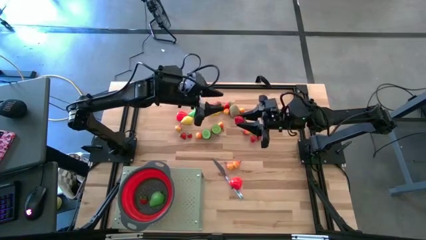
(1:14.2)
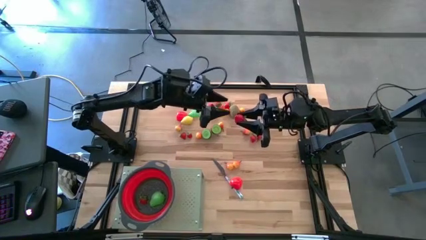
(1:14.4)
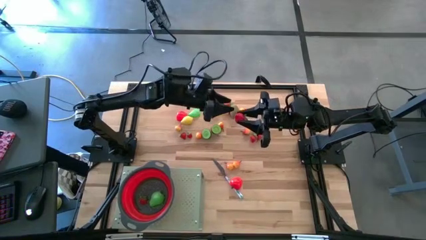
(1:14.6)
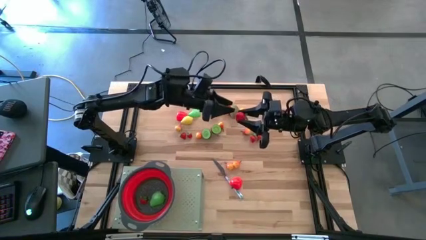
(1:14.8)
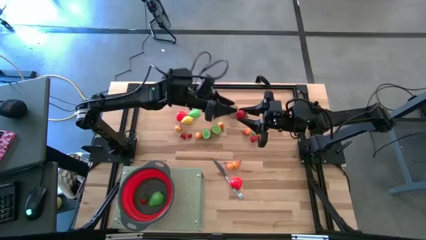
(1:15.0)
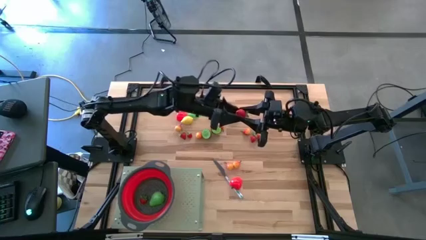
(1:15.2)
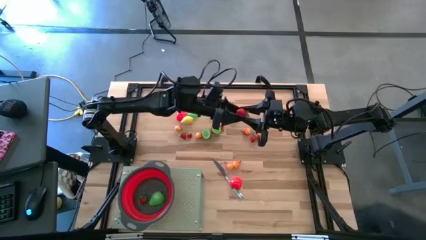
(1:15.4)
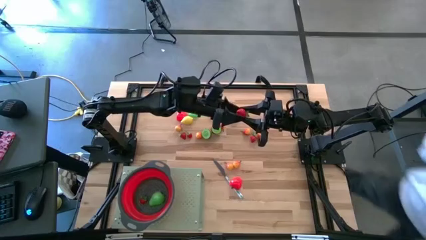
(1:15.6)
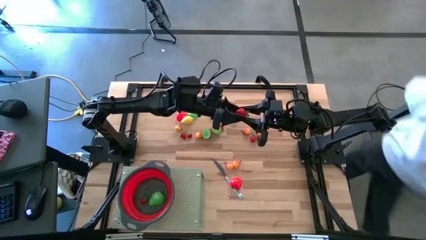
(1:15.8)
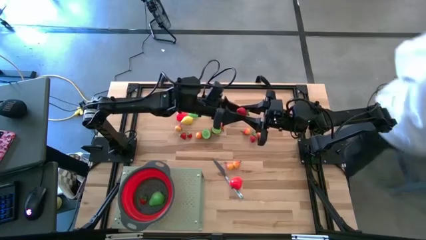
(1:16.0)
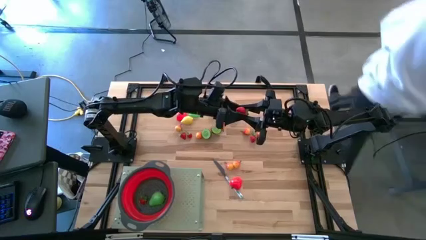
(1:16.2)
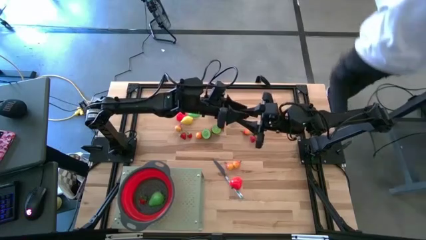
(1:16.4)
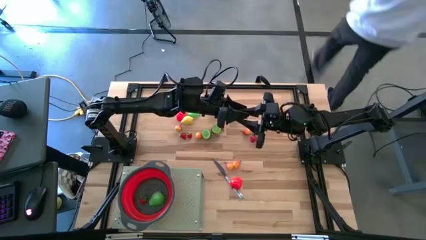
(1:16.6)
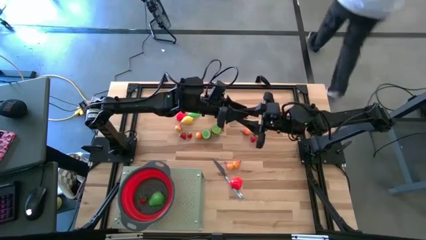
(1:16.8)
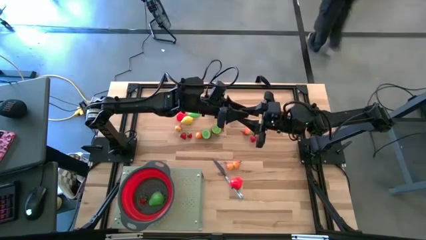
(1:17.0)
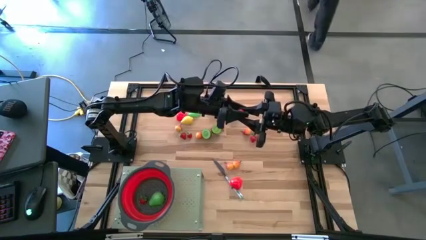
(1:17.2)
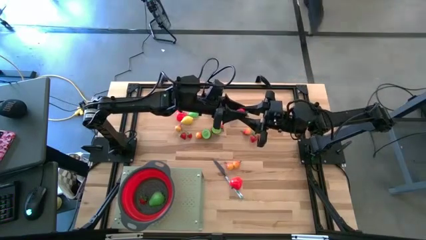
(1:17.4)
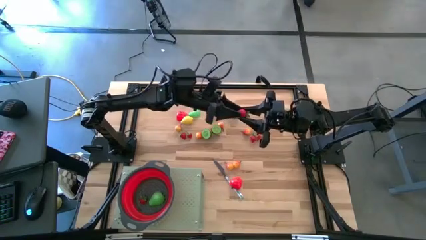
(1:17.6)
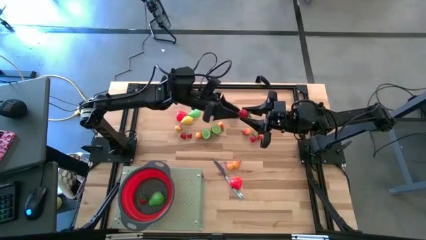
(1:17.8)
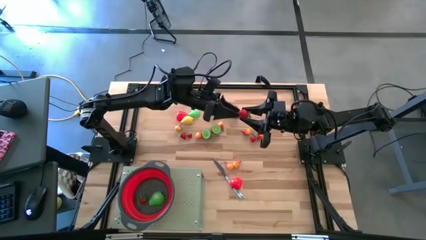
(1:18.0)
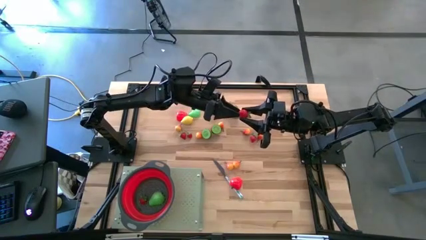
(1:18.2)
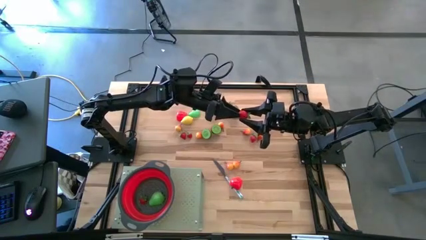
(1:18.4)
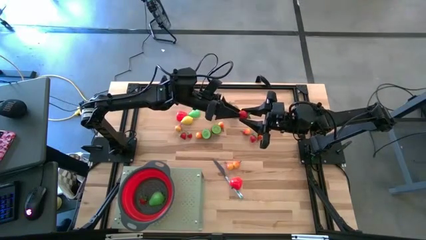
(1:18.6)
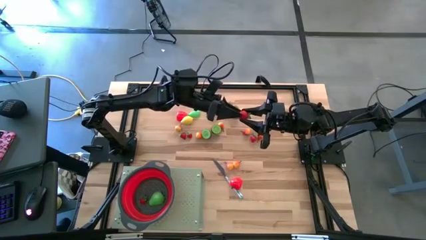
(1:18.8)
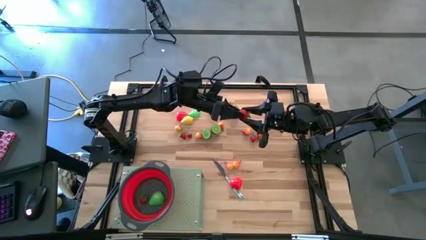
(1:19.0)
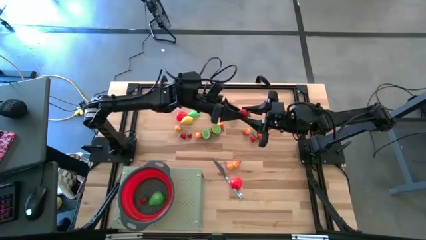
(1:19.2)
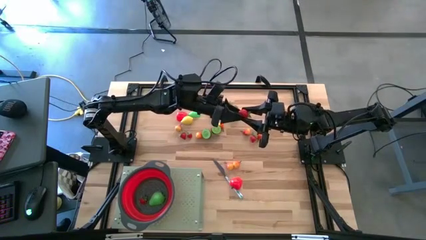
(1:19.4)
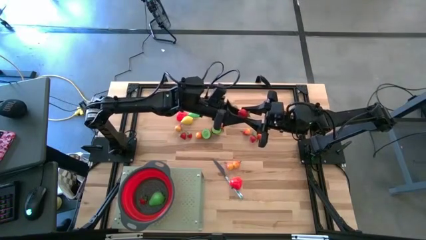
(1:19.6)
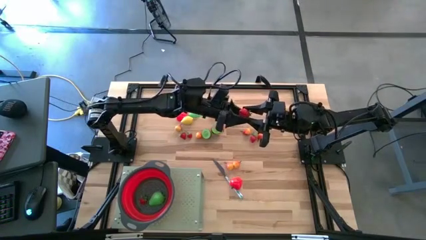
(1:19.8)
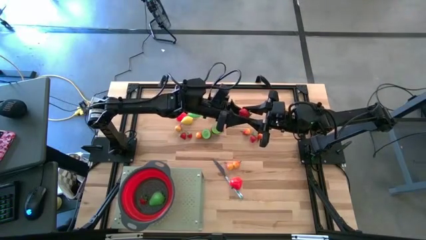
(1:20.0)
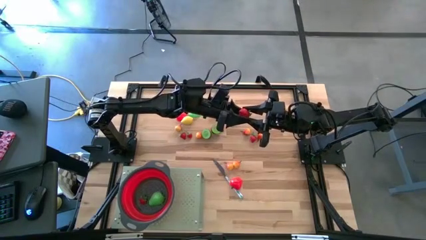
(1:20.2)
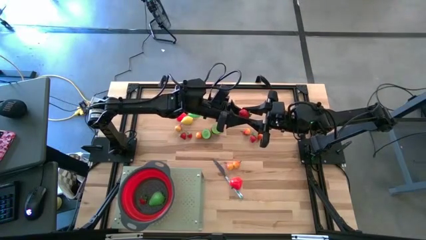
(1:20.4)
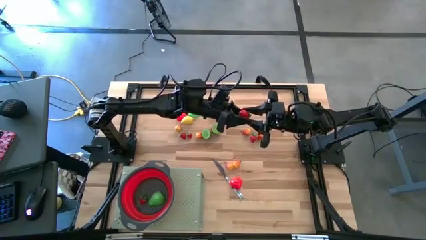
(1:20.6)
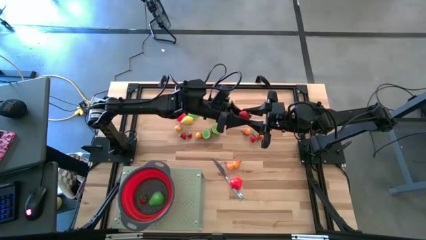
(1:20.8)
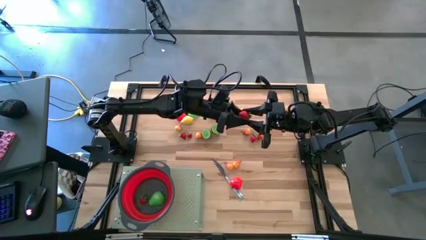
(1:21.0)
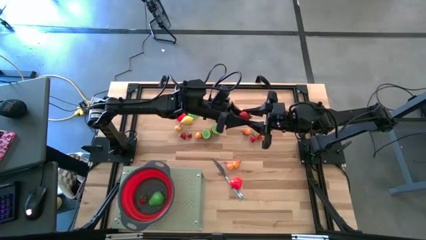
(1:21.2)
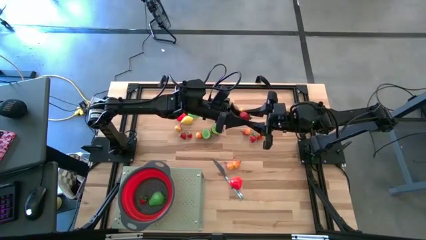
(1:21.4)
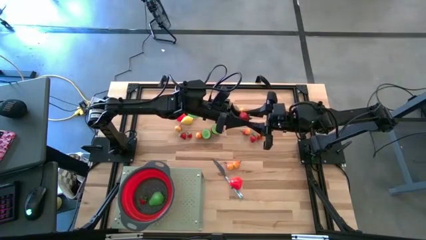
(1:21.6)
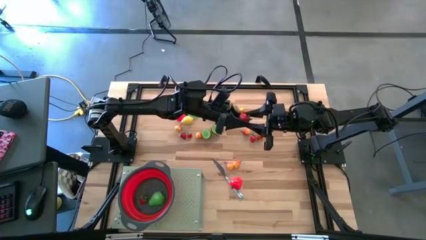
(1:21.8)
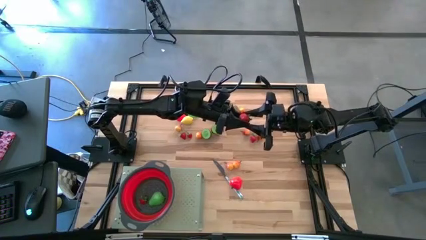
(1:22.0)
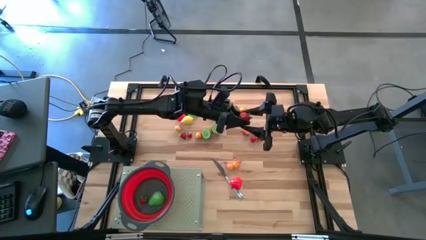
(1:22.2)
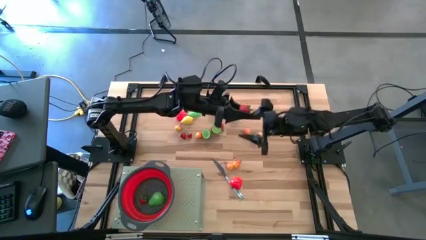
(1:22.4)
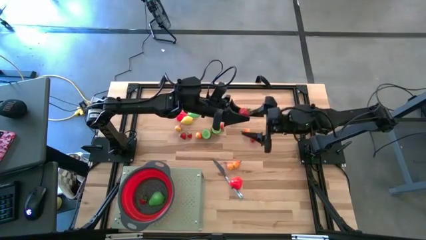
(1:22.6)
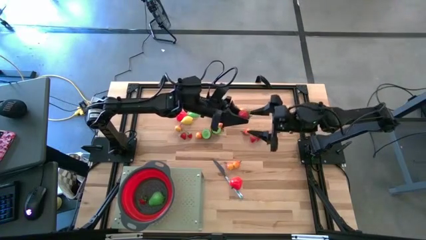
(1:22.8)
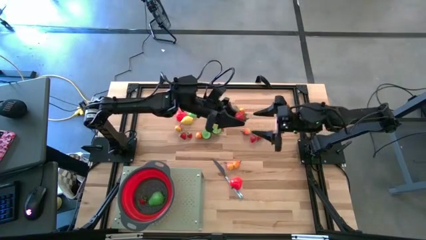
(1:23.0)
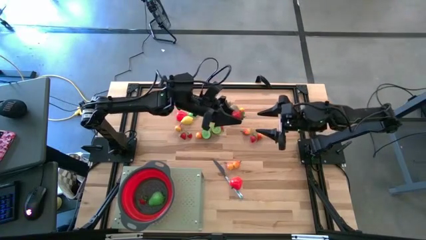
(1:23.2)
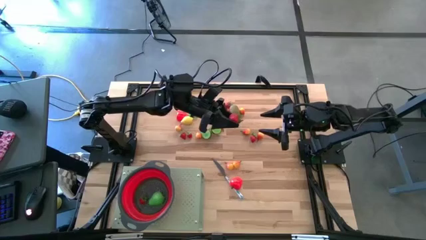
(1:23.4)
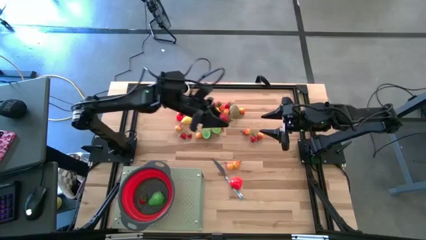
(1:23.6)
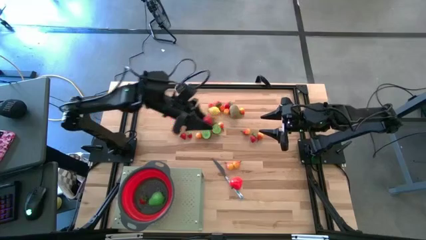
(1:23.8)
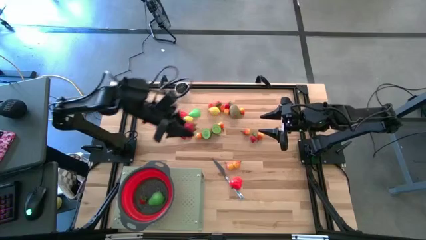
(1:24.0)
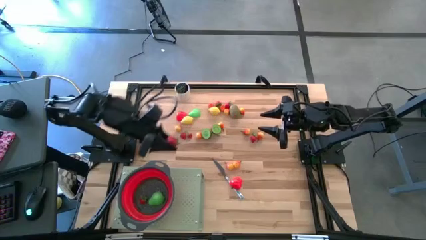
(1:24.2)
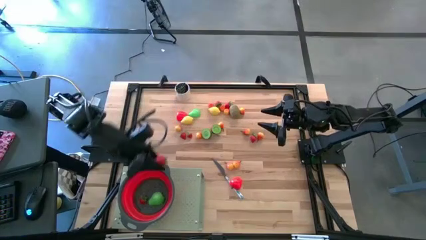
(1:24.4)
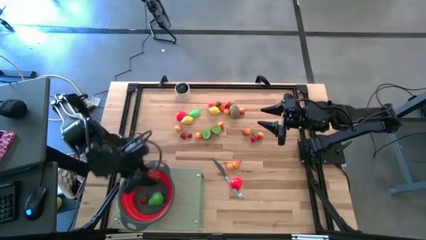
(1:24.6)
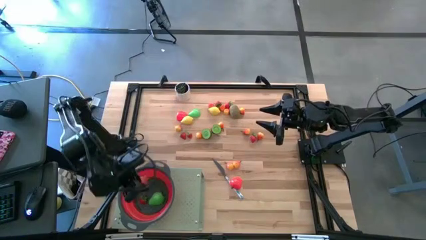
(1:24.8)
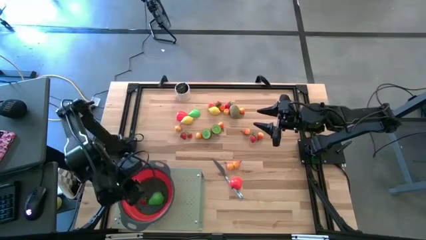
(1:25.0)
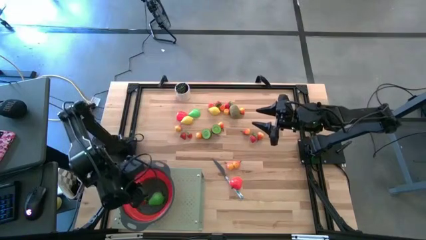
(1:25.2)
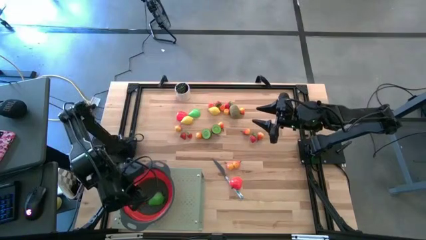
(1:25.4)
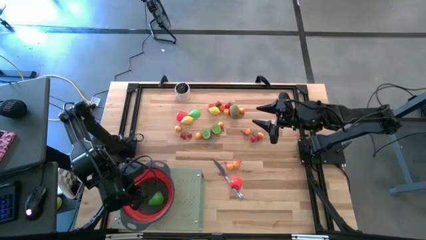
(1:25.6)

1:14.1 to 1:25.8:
Task: Pick & Place Fruit
Put the strawberry into the red strainer bowl on the shelf

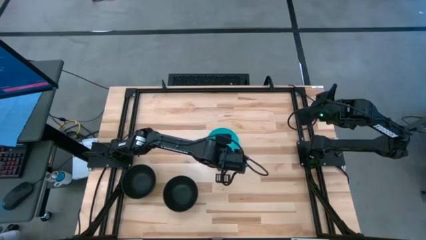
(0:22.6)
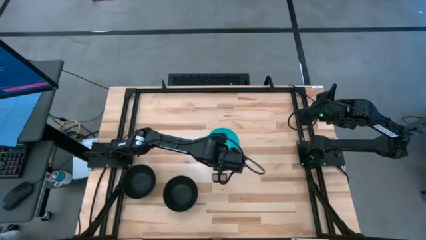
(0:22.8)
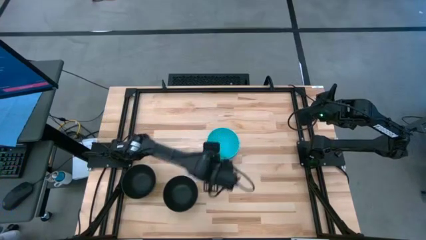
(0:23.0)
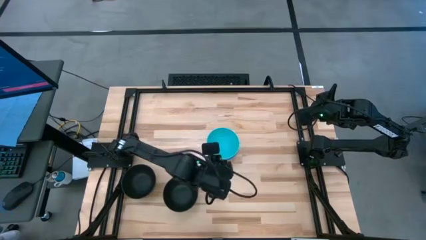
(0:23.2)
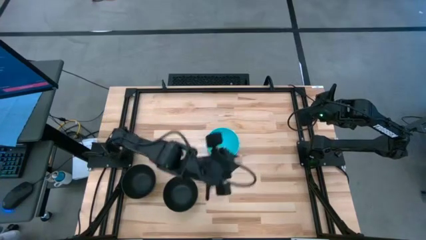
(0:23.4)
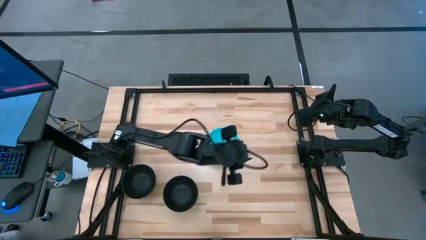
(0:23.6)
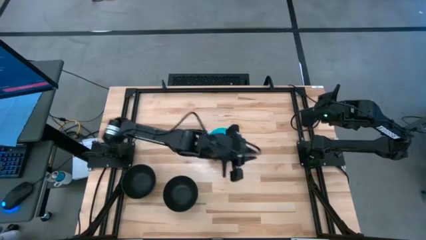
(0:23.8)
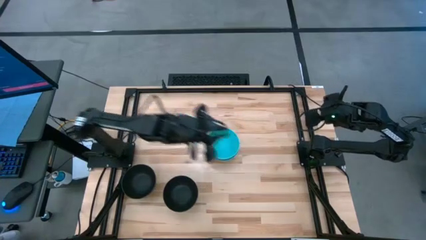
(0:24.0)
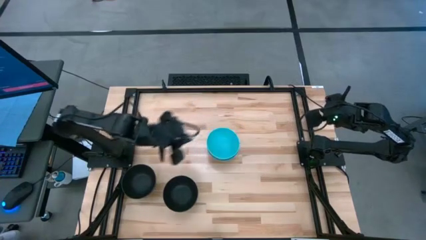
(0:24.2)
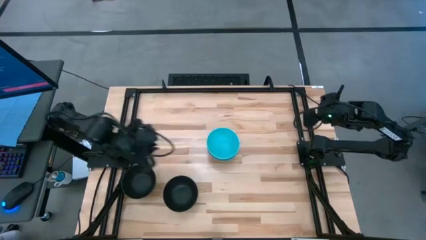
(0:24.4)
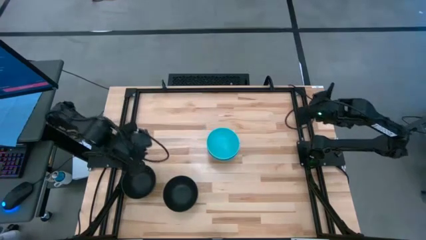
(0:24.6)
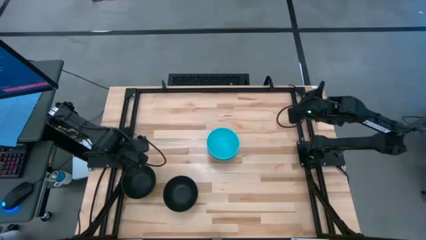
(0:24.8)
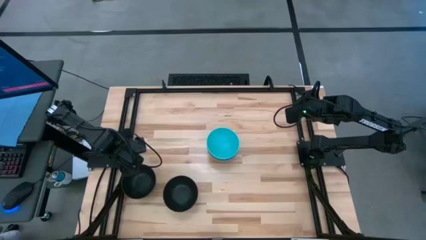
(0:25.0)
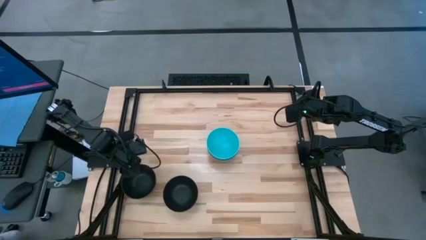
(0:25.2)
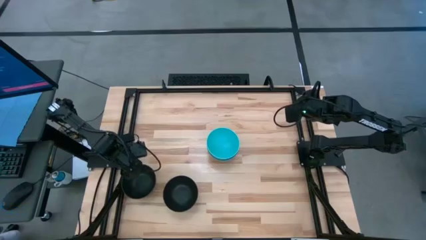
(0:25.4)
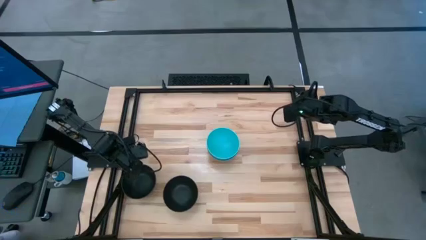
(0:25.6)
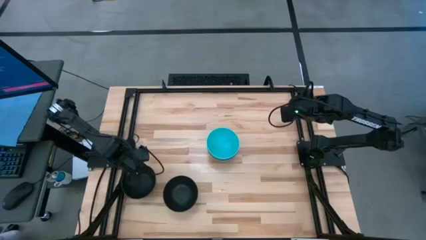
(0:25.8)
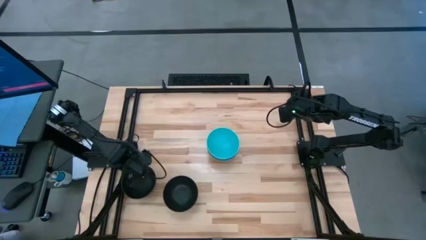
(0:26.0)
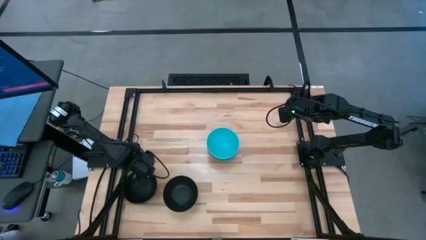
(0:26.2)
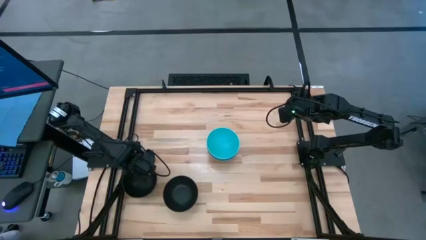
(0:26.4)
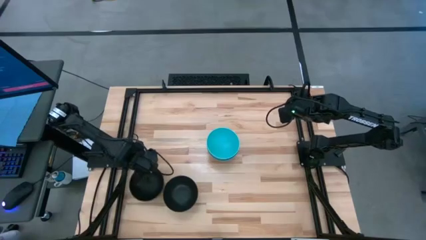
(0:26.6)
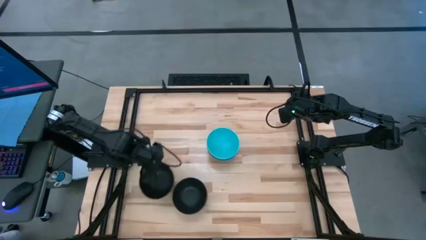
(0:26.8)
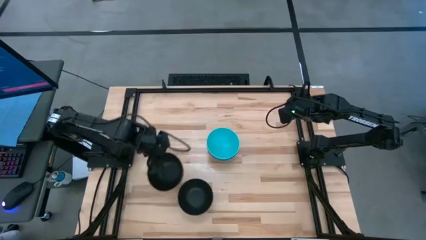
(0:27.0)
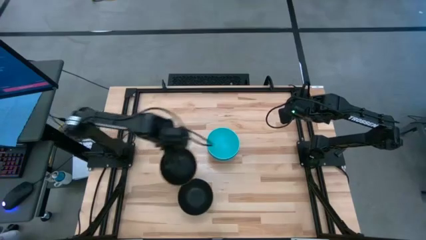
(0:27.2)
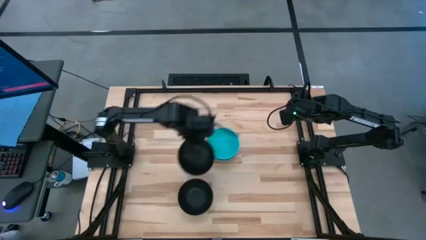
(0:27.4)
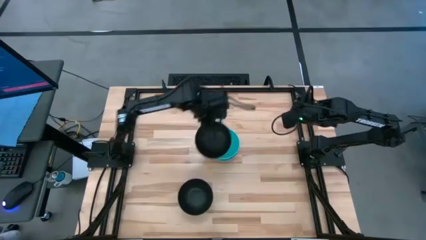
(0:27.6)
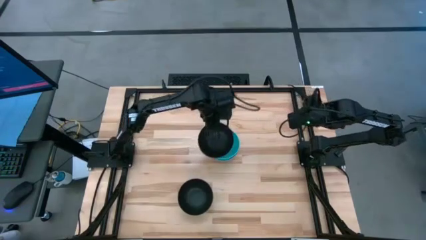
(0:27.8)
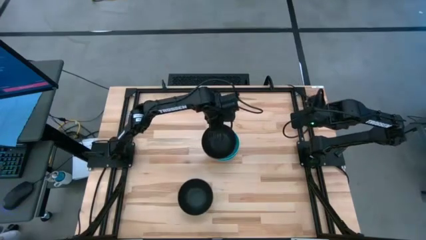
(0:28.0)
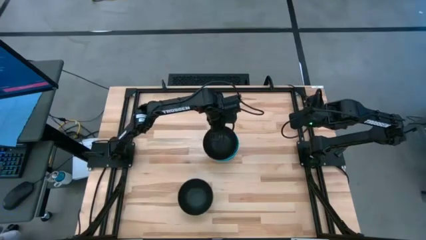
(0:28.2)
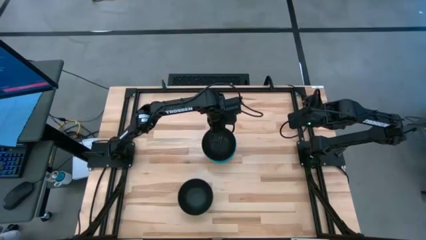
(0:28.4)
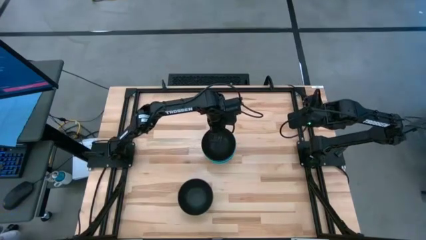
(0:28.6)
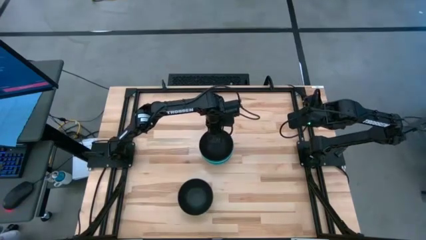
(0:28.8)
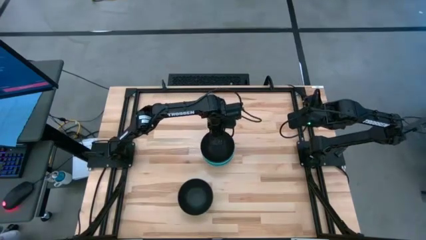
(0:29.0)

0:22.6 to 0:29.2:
Task: Nest bowls inside each other
Stack the left black bowl on the blue bowl
